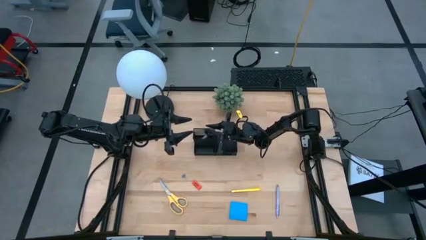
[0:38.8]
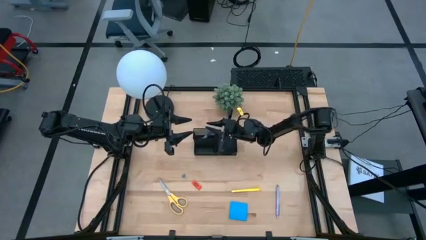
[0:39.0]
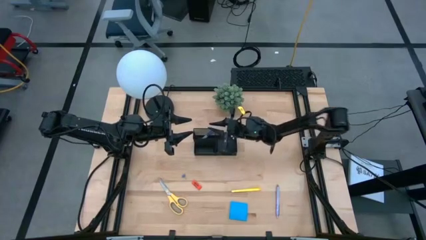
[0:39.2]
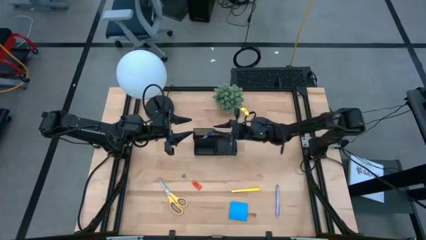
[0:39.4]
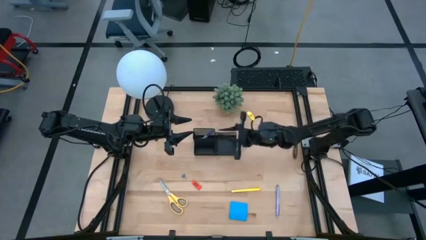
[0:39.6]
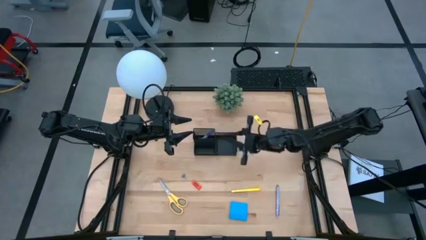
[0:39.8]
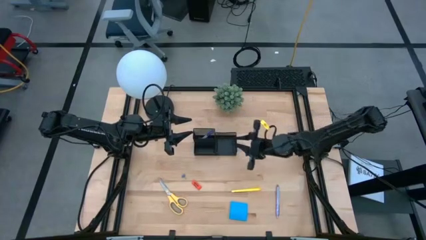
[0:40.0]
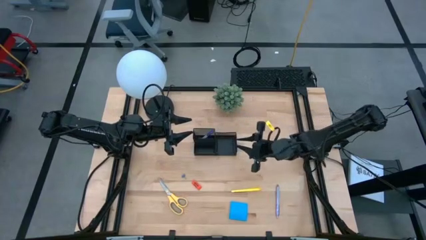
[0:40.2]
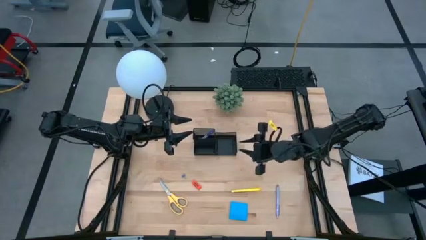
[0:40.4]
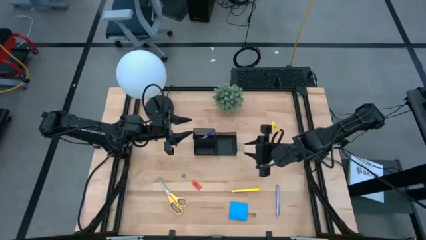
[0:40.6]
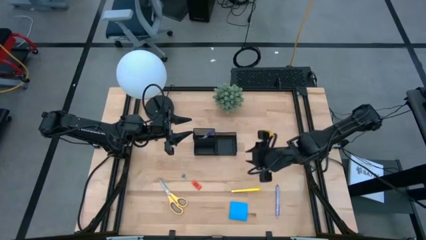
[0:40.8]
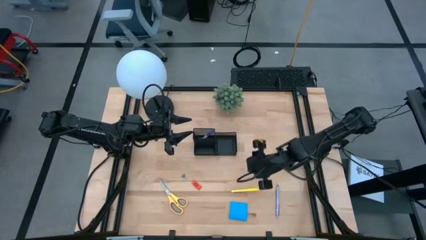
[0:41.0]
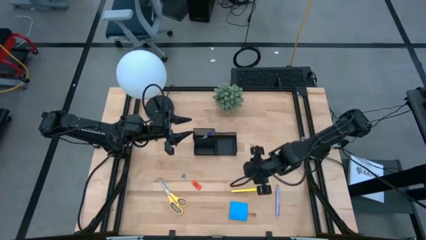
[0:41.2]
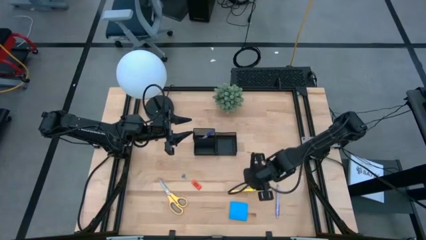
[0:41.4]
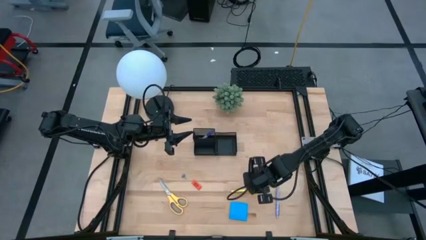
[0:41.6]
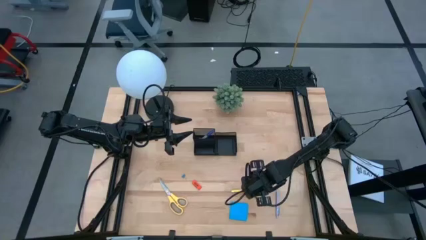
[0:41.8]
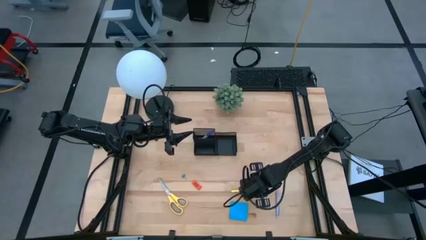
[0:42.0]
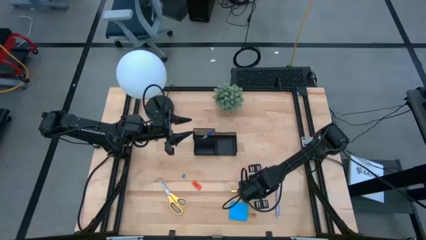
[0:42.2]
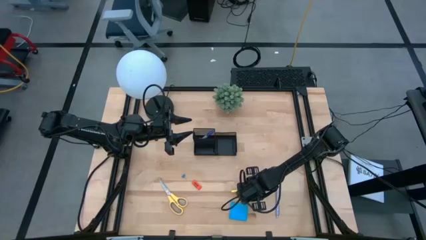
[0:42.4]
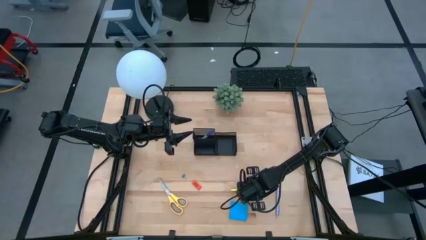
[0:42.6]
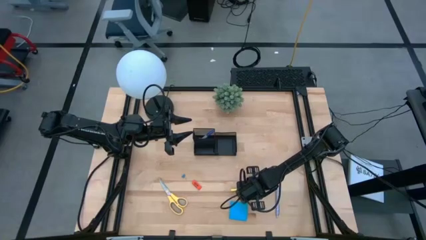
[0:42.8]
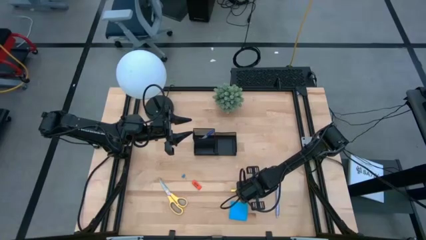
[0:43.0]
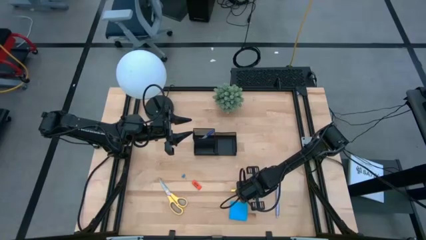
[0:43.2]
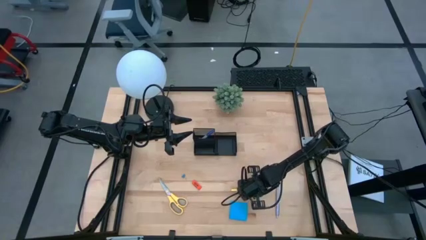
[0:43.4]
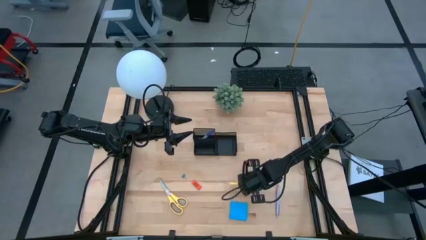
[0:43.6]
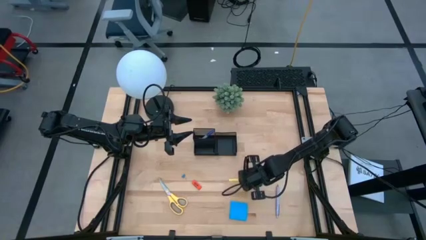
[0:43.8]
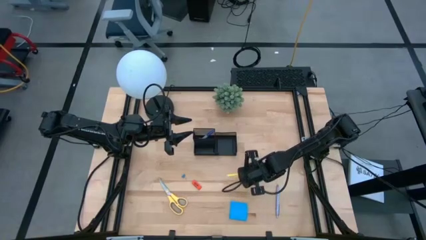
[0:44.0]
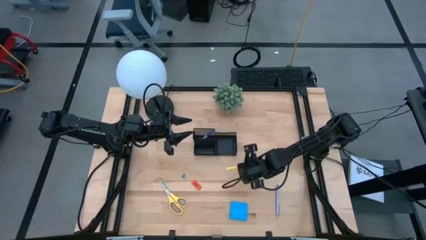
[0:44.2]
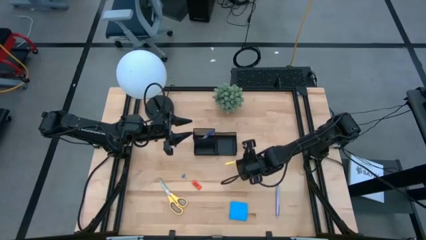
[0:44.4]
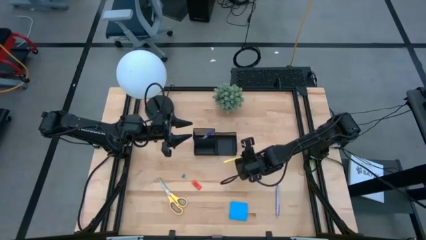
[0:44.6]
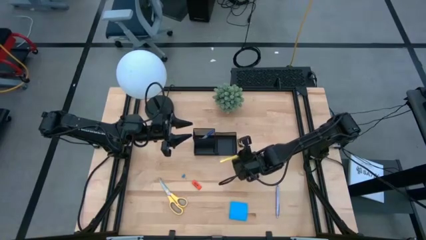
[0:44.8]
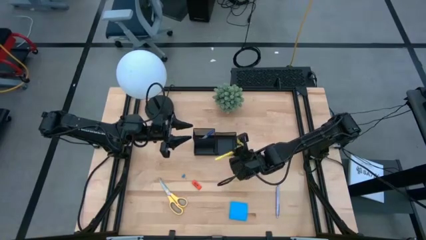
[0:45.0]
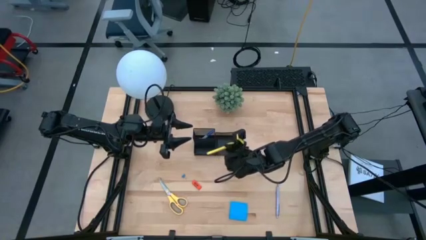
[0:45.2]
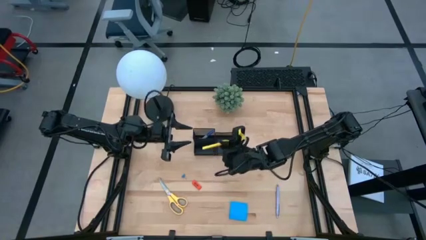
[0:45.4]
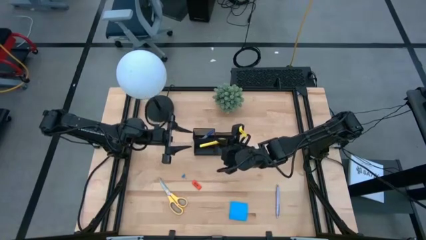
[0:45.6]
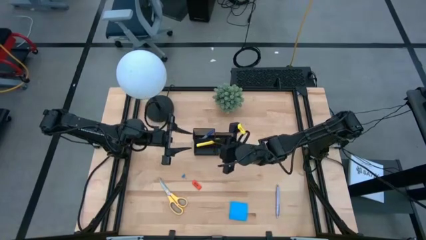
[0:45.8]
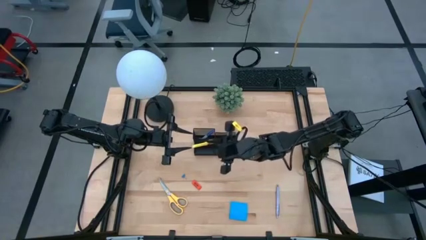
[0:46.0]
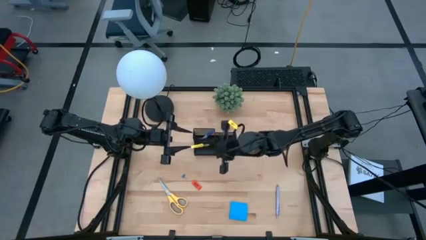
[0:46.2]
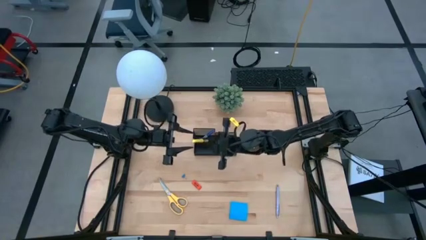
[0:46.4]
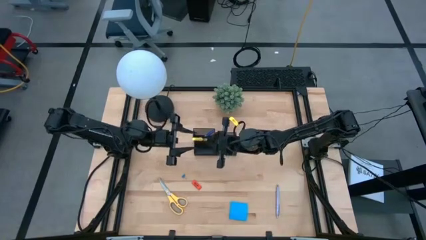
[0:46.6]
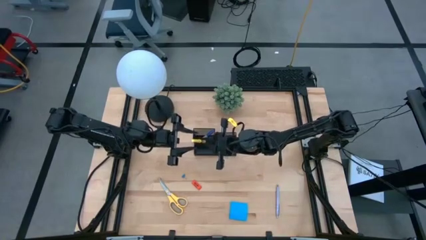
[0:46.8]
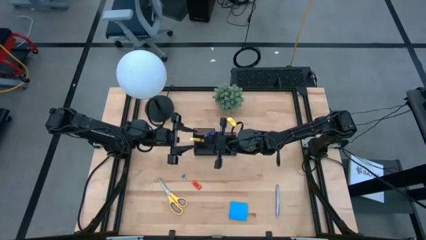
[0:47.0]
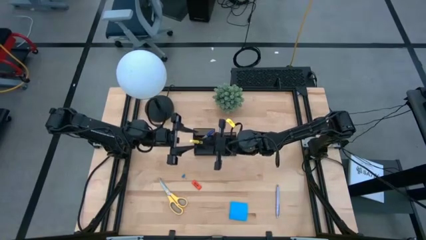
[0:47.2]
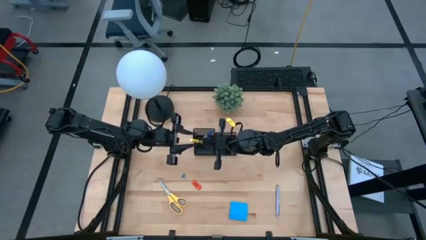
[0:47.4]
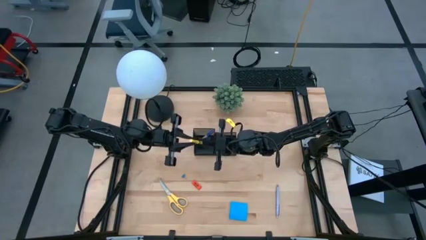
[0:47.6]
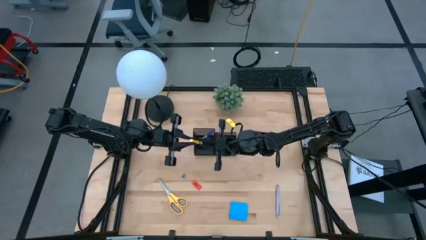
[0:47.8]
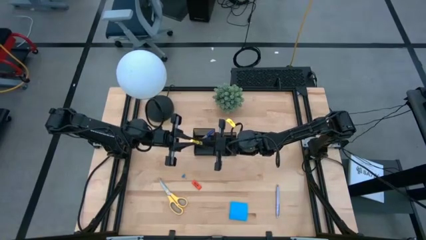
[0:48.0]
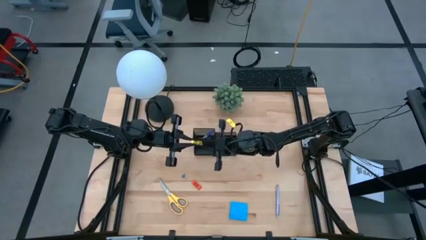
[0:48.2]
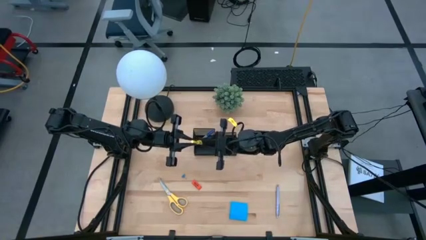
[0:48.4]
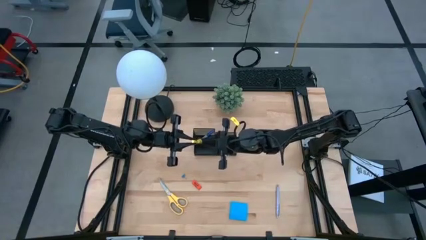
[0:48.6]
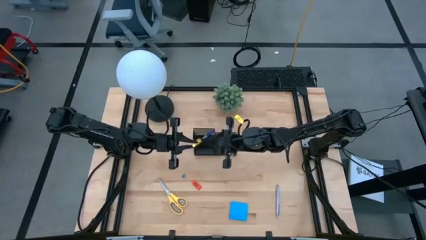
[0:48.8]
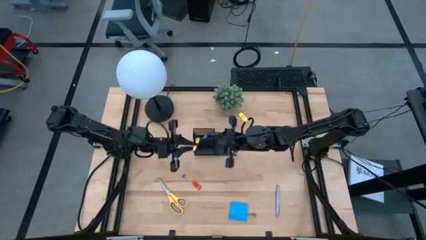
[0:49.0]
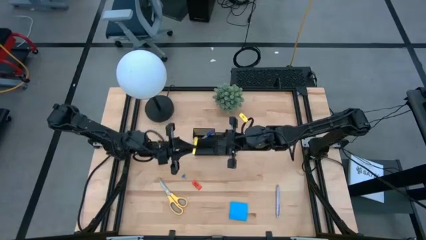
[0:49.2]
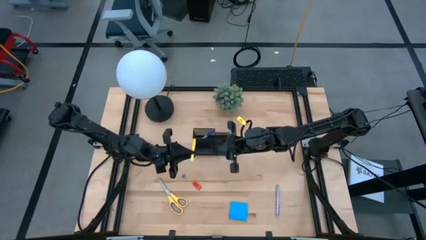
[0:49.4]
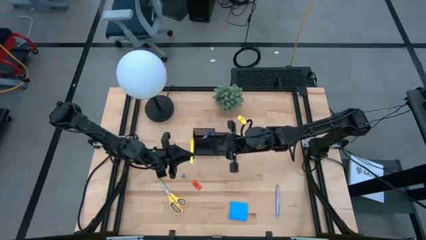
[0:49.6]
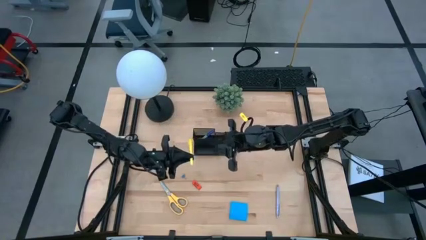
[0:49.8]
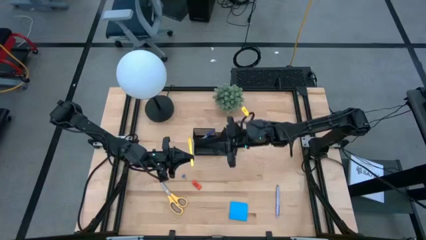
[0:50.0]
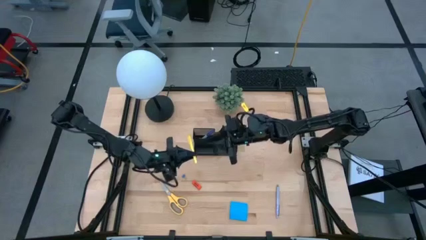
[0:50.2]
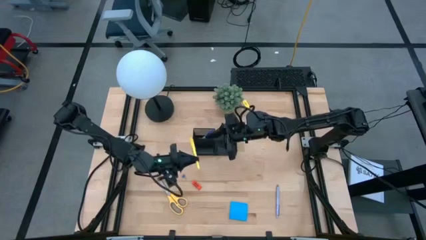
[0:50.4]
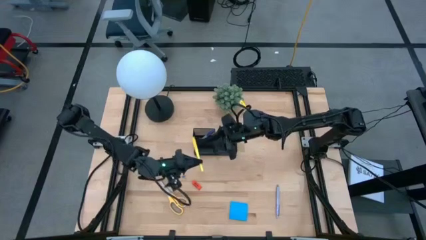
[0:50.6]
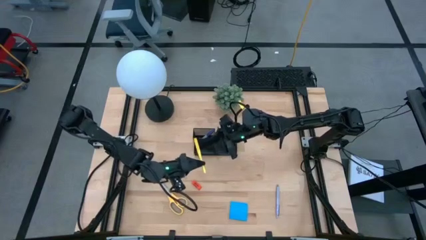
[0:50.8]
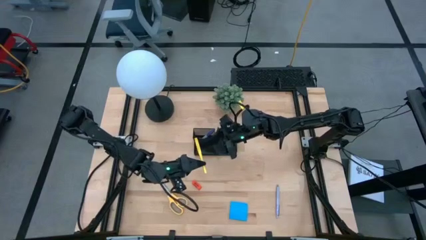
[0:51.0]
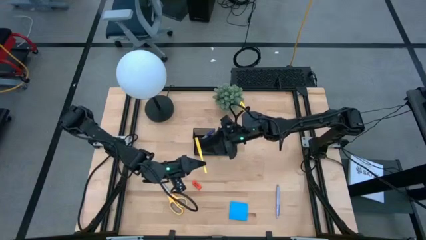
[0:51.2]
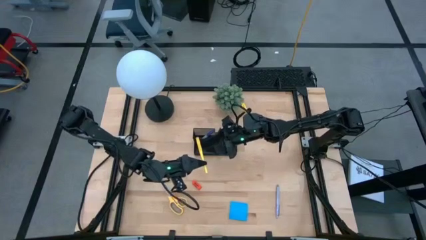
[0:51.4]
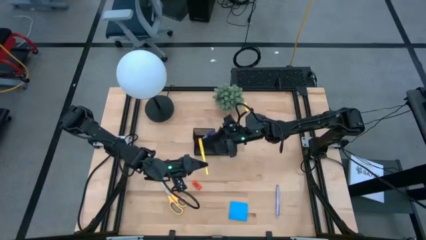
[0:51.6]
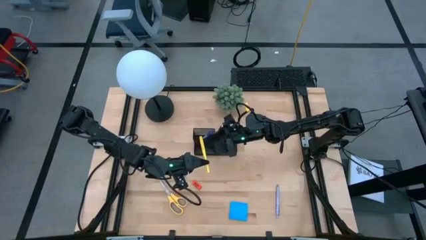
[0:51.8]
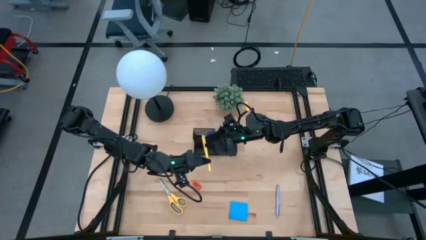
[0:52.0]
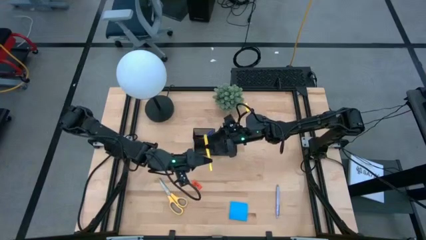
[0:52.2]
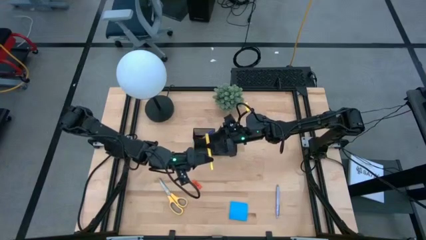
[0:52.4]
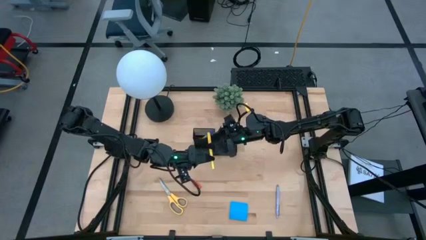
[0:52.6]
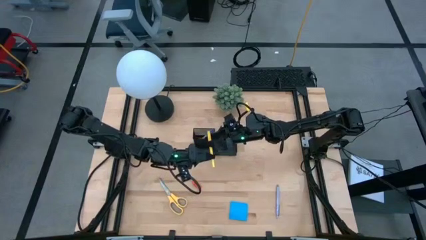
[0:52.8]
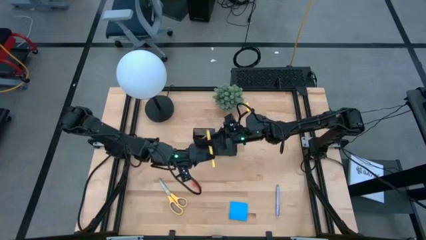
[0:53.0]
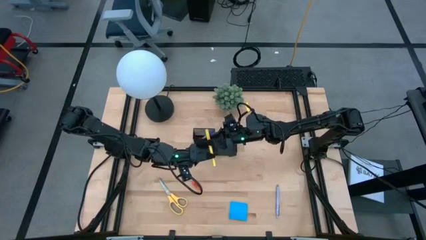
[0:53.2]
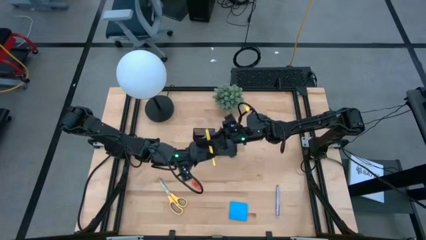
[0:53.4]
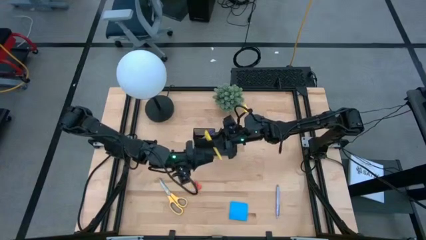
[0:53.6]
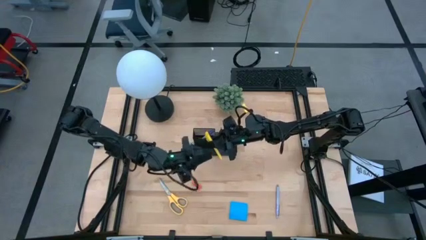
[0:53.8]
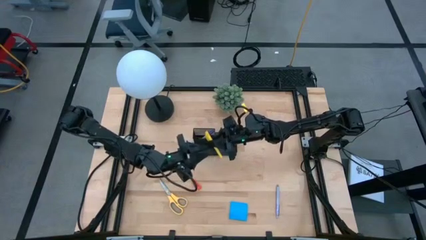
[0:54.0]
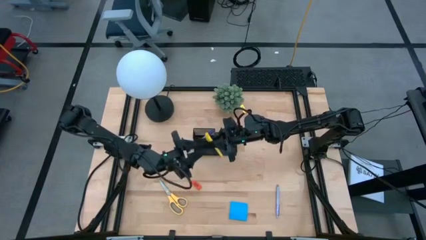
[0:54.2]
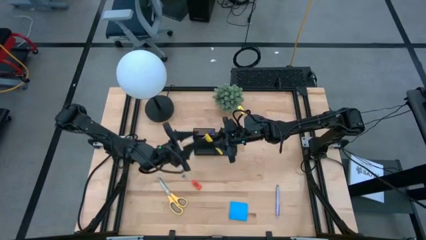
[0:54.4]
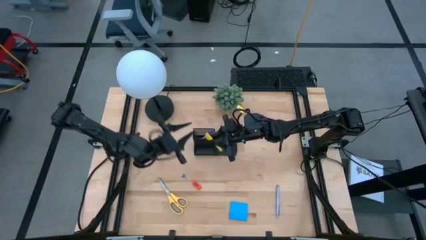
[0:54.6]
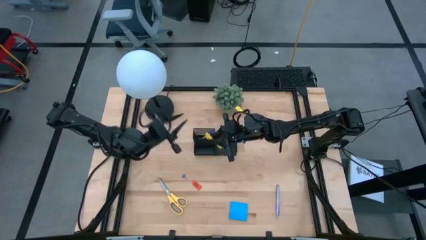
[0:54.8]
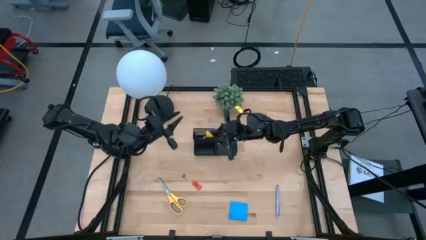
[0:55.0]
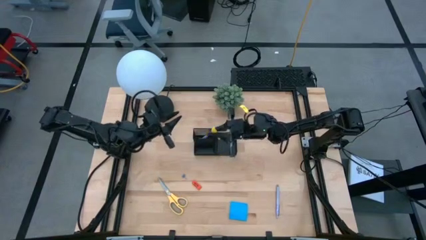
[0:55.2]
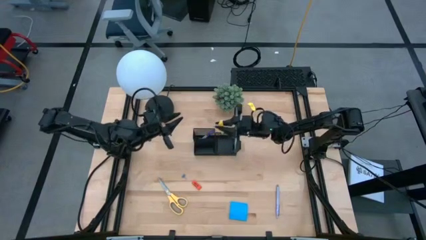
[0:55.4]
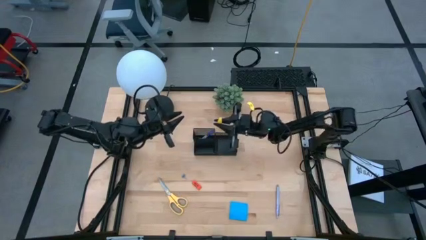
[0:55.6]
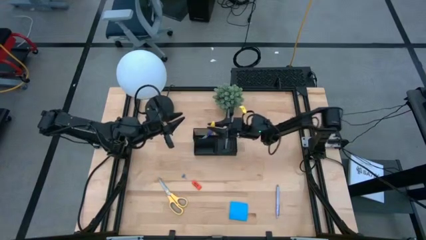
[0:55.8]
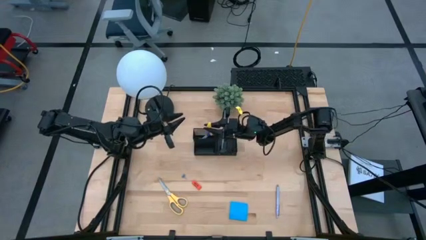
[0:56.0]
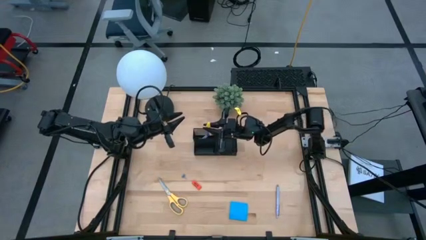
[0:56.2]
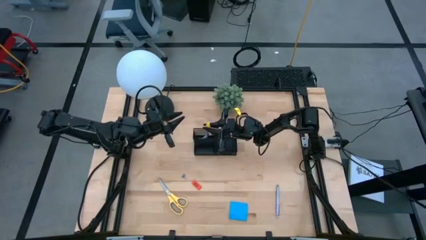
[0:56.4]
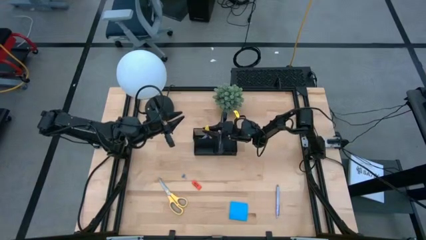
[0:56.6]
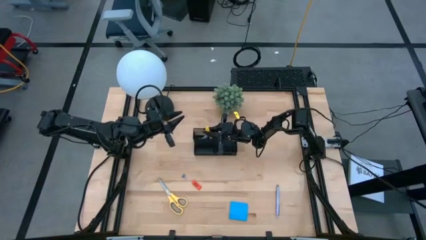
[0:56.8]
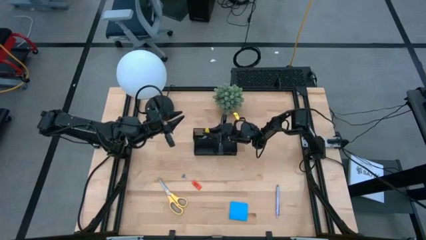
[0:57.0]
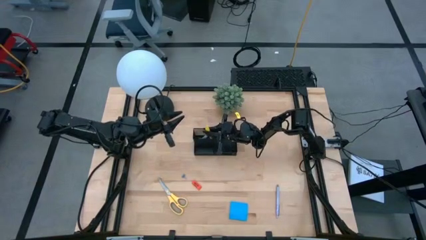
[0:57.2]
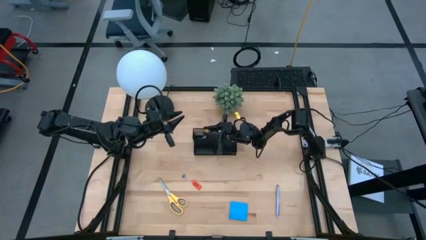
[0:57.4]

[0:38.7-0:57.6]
Task: Pick and place office supplies into organizer
Put the highlighter pen into the desk organizer
